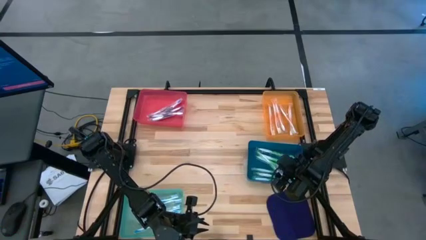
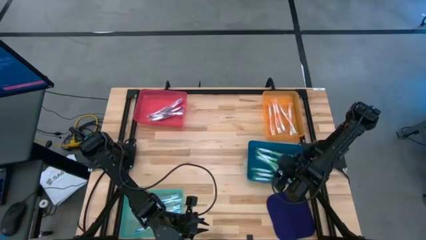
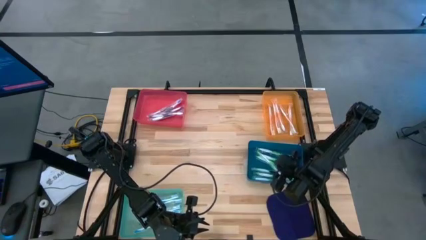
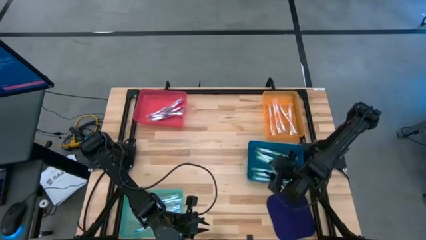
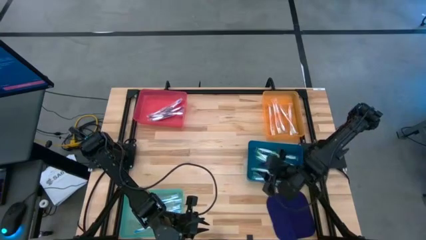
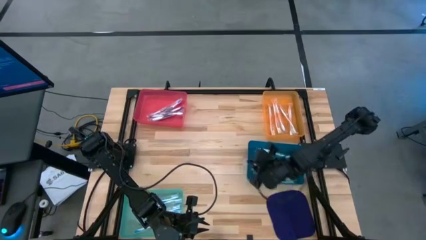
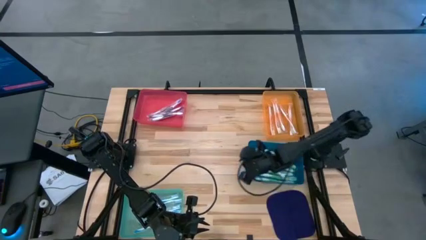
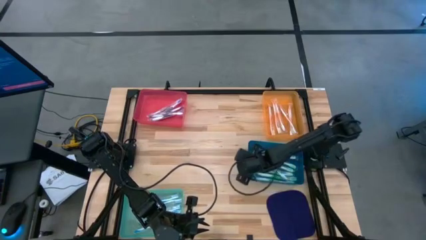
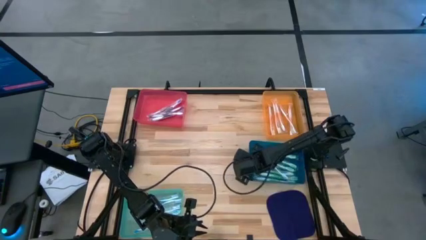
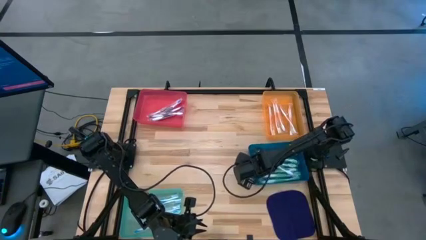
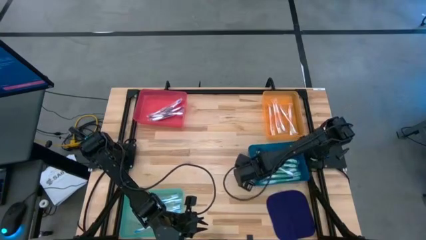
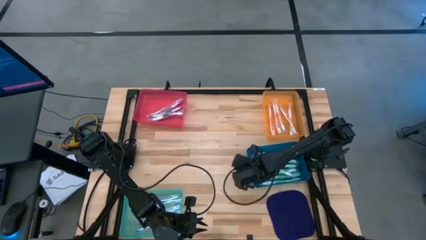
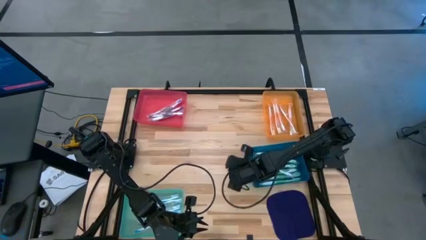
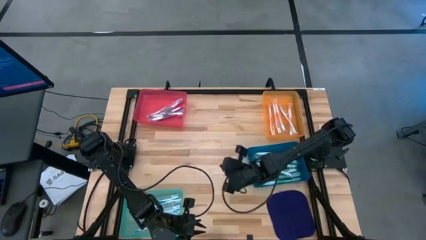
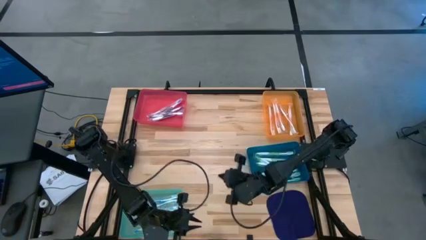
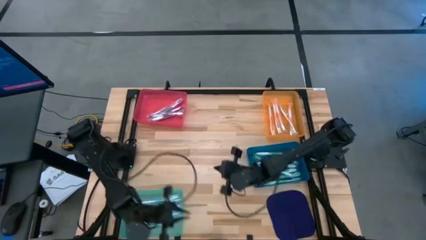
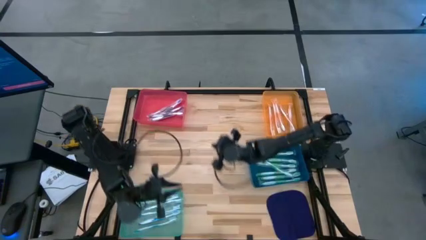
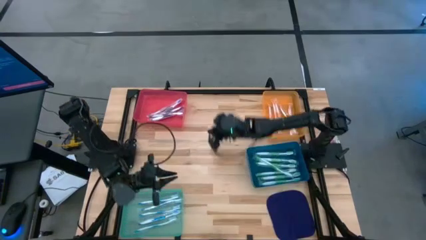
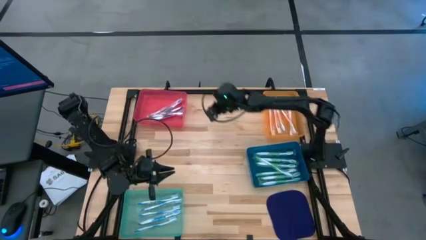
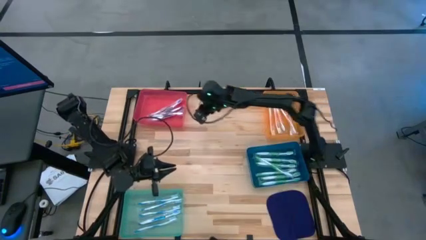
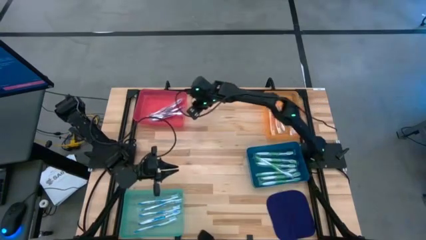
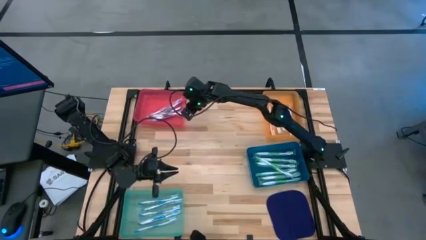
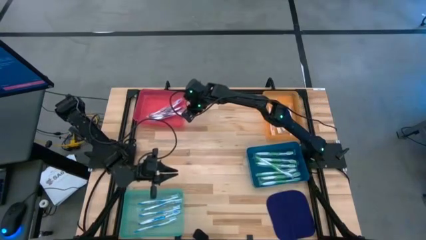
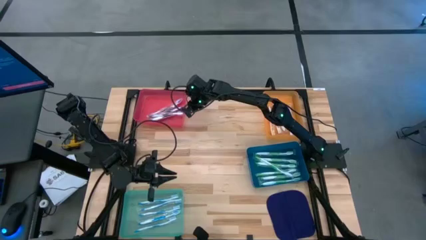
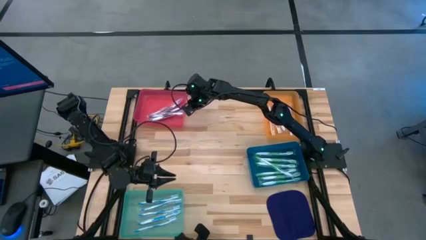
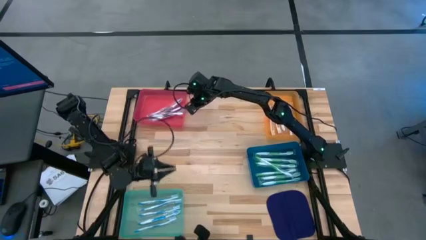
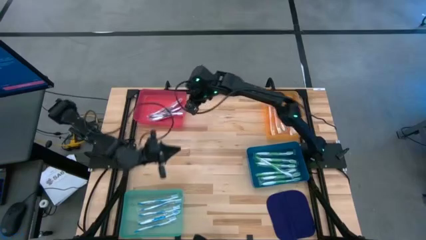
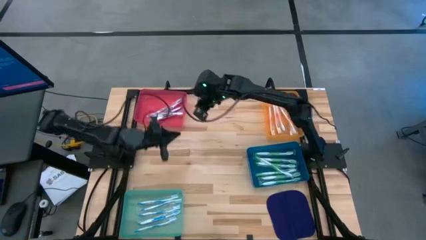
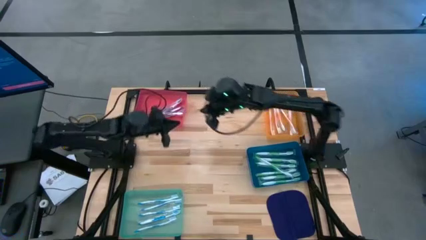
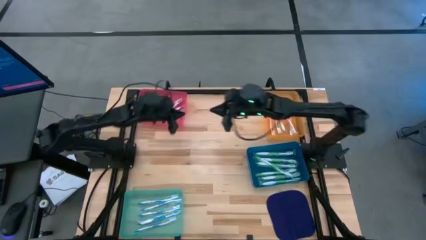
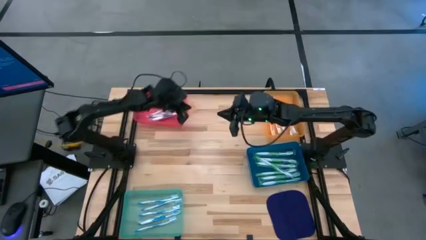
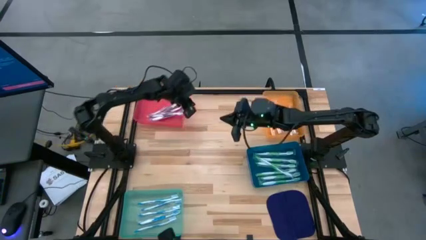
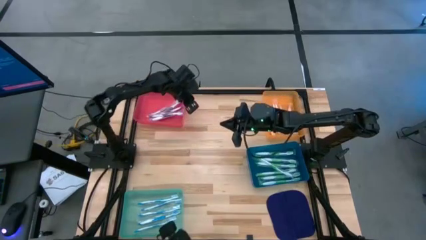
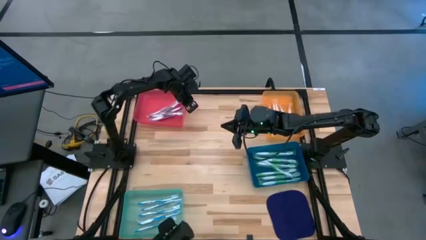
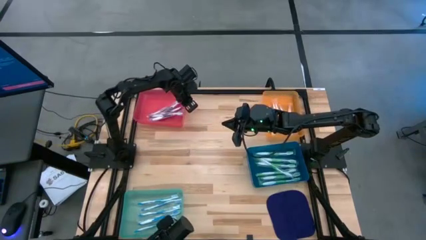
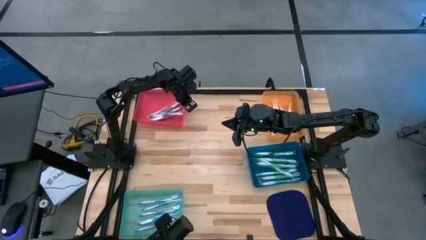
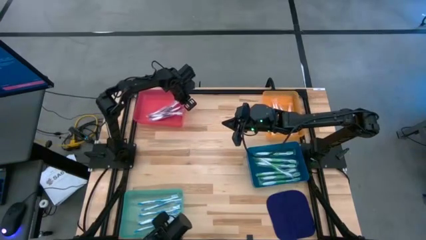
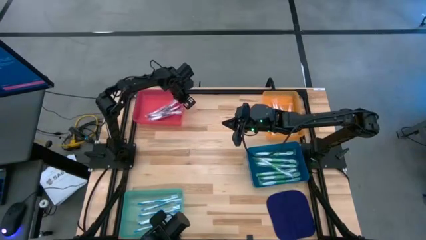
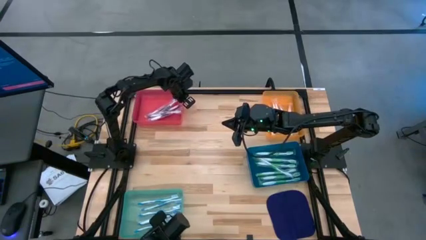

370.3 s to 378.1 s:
Task: Pick & Place Toothbrushes
Adjust the bins

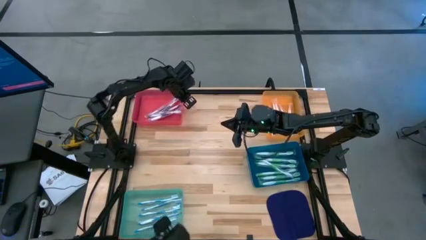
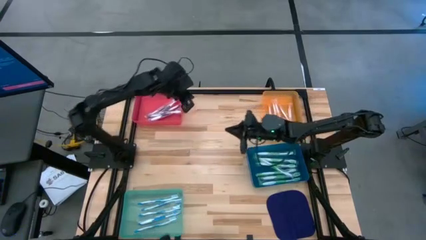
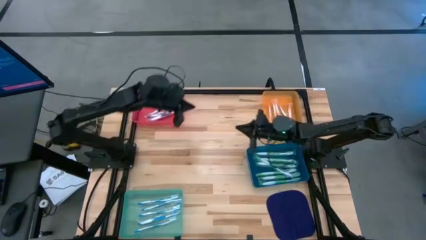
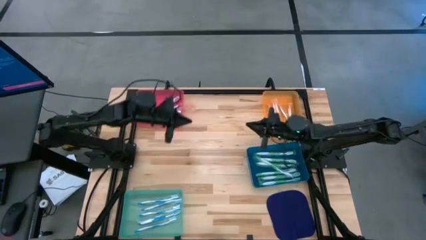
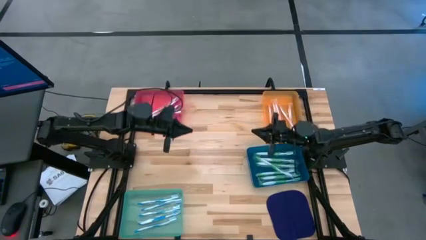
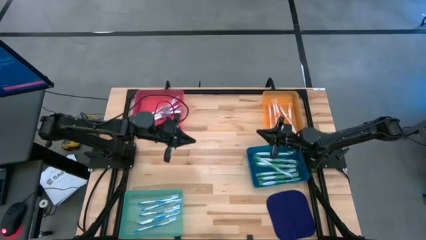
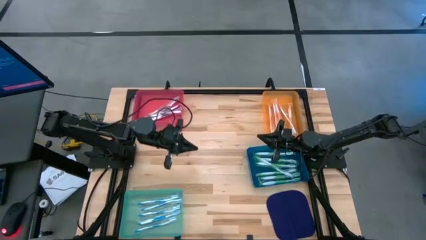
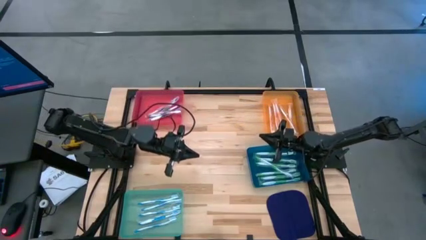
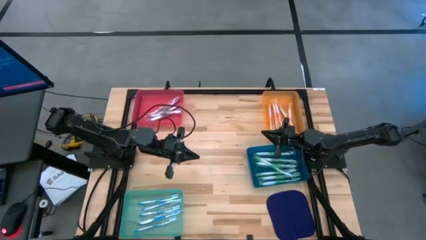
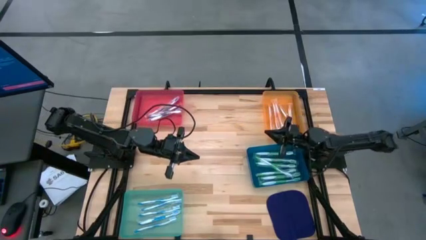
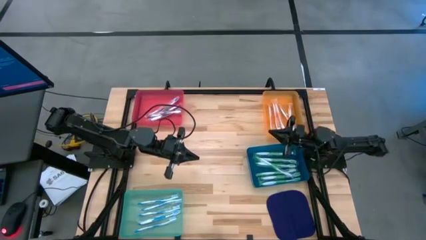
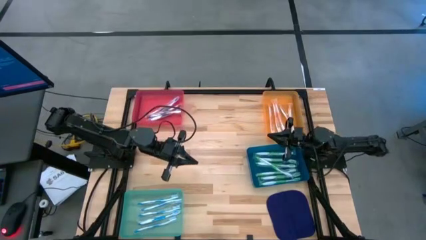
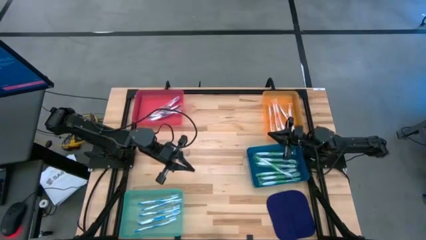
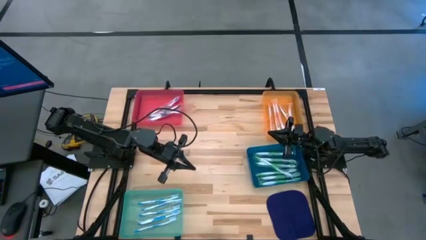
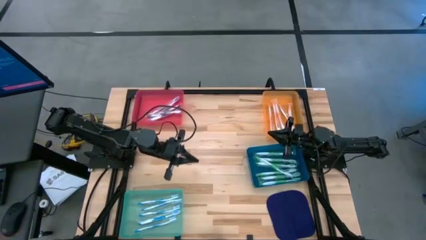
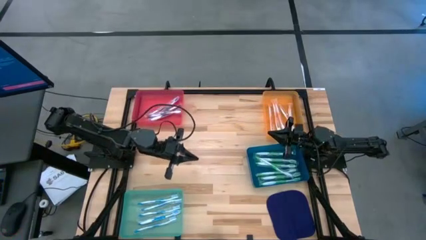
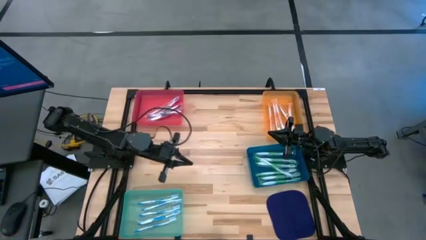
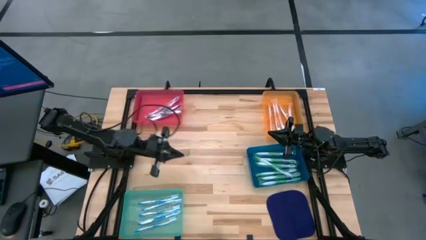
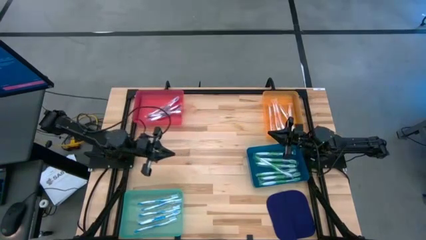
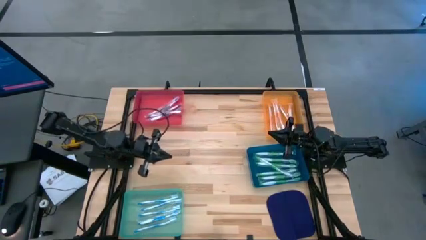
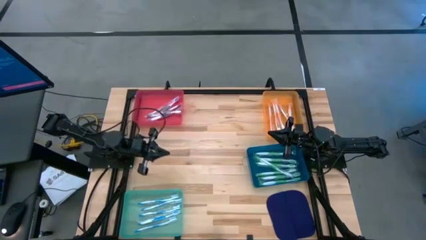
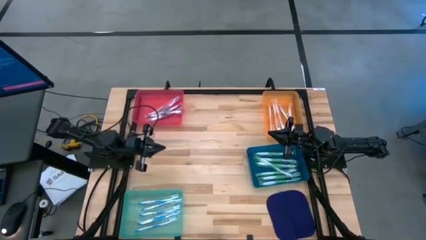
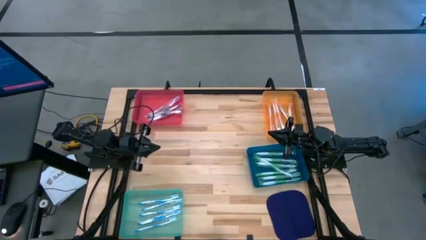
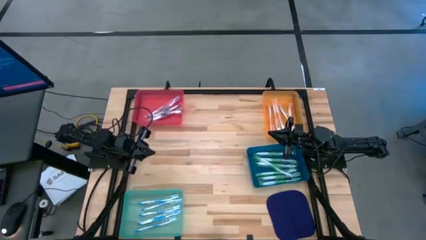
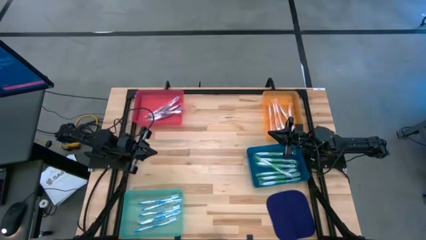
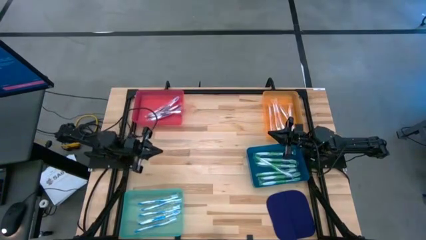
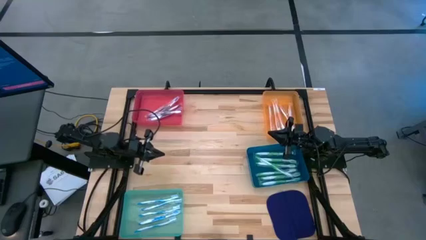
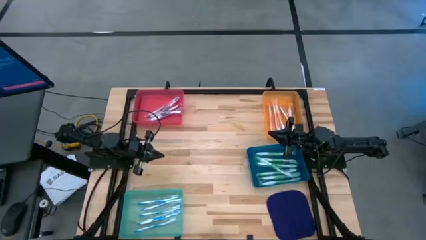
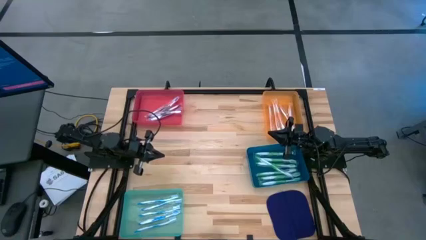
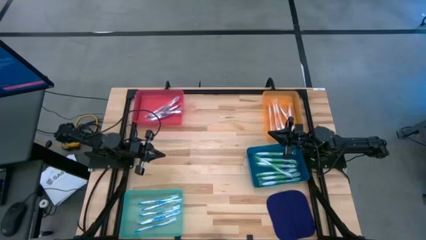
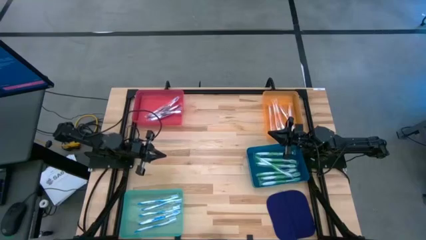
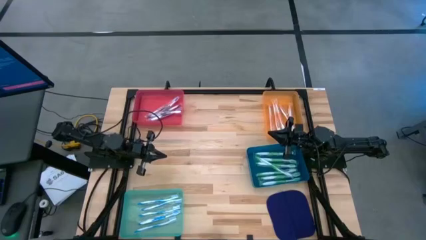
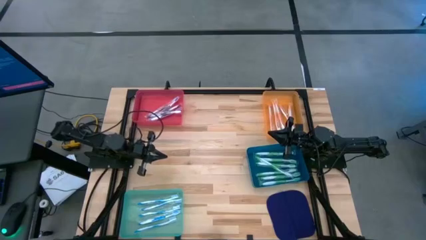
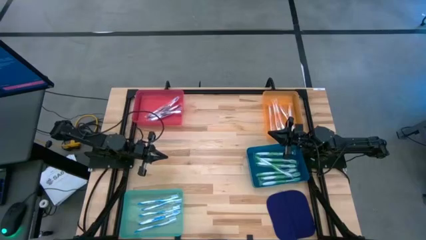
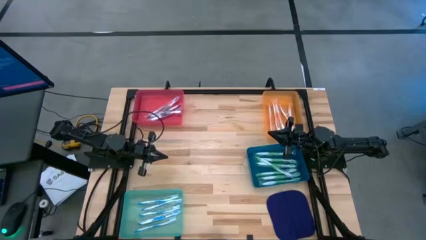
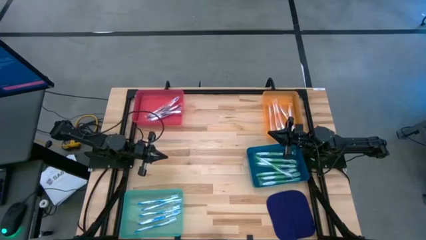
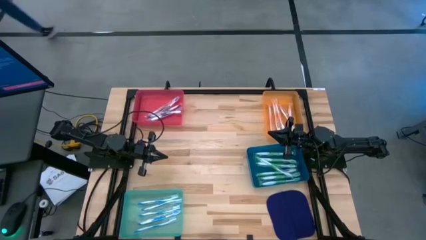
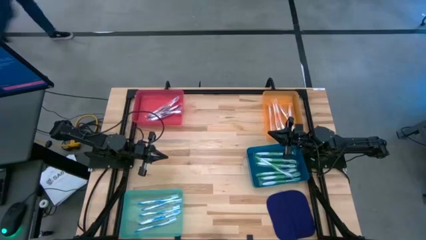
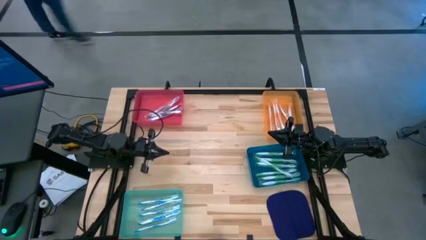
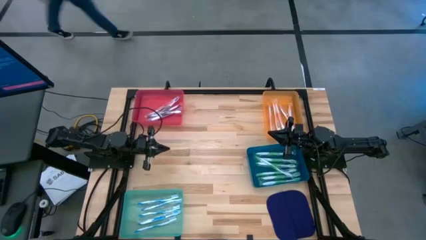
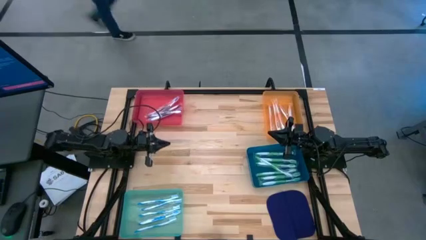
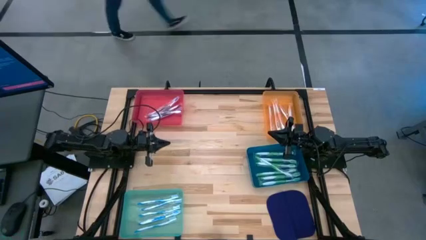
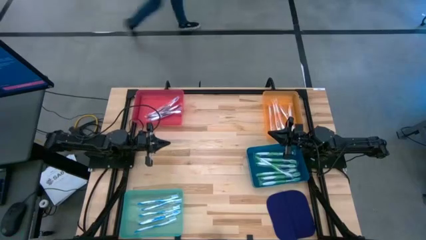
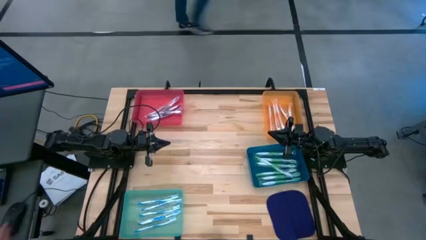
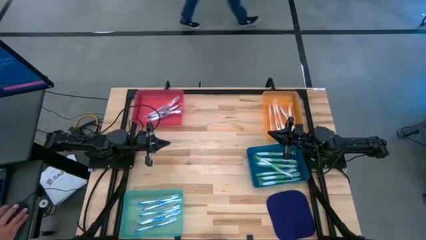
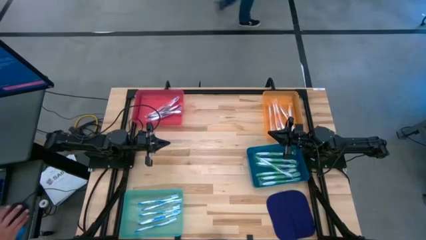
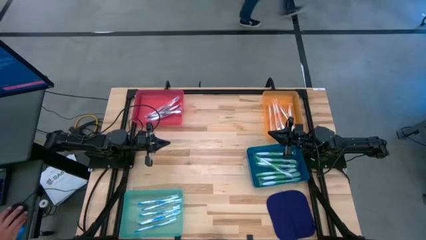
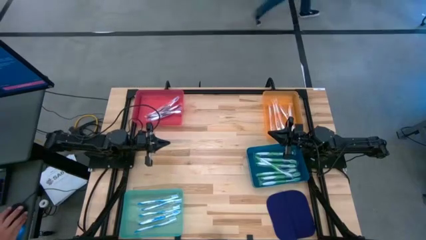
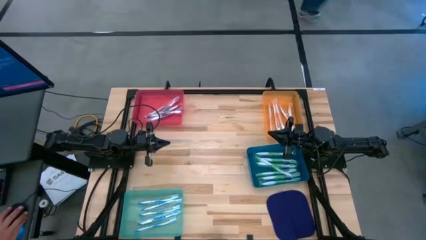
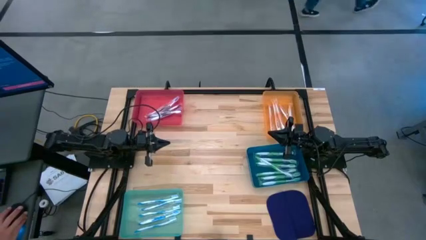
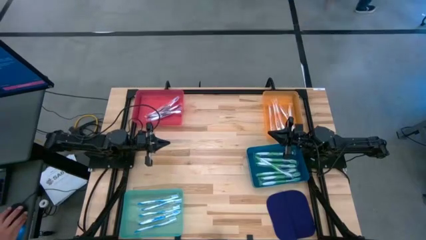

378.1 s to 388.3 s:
Return to Home Position
